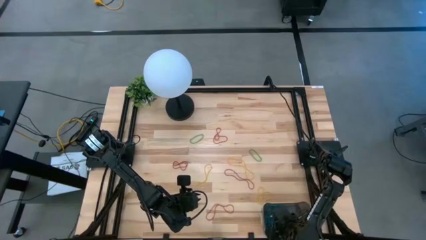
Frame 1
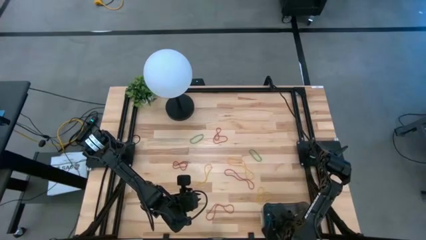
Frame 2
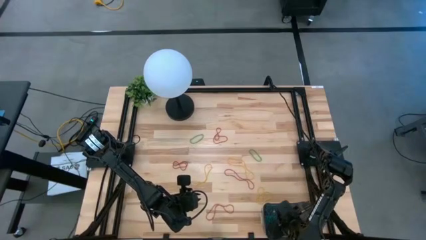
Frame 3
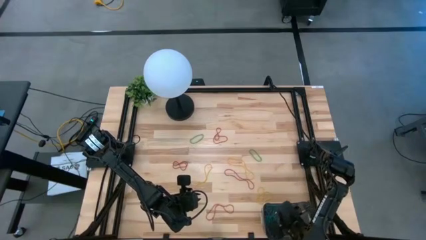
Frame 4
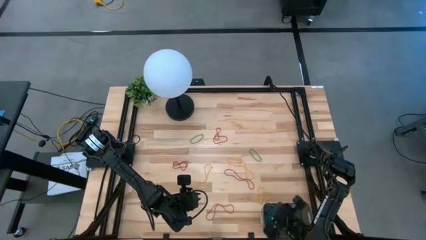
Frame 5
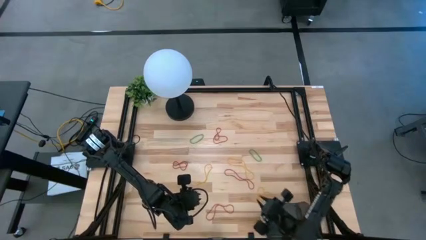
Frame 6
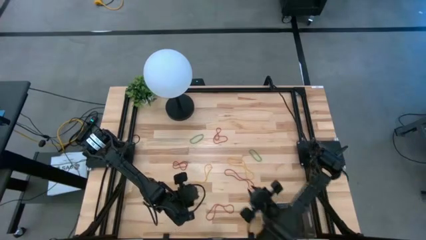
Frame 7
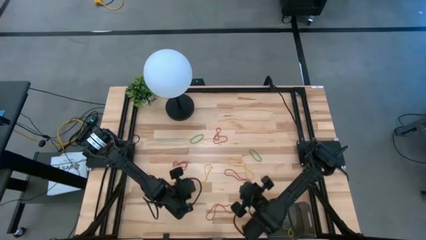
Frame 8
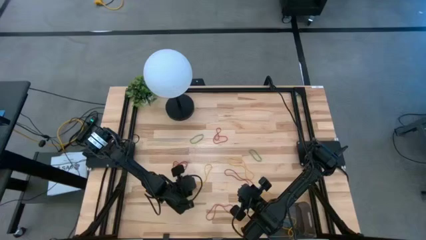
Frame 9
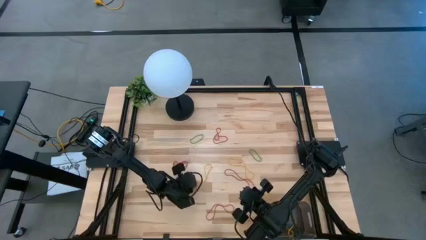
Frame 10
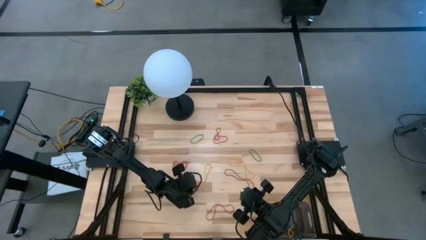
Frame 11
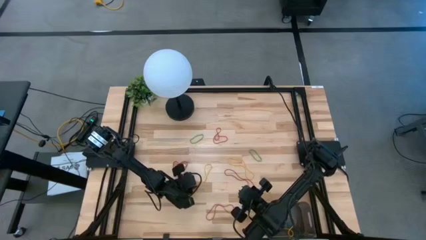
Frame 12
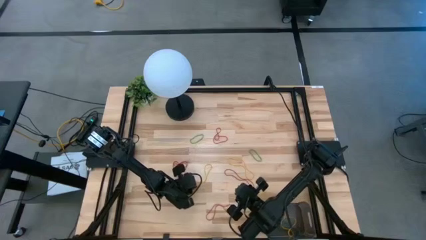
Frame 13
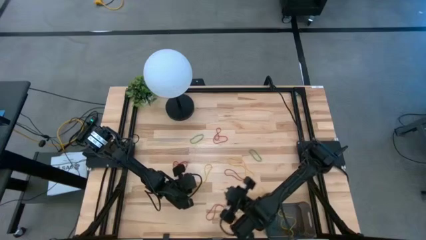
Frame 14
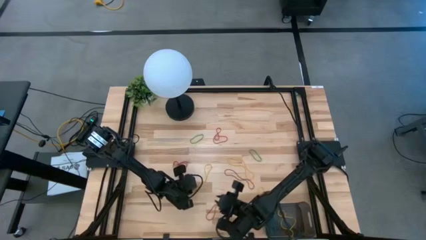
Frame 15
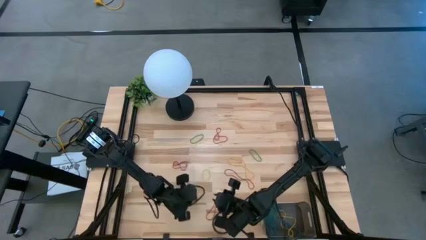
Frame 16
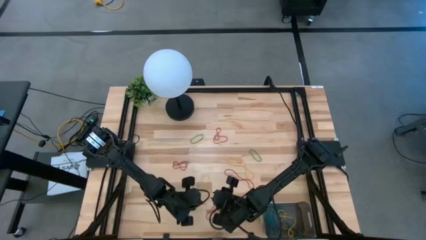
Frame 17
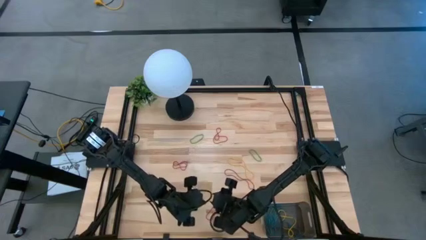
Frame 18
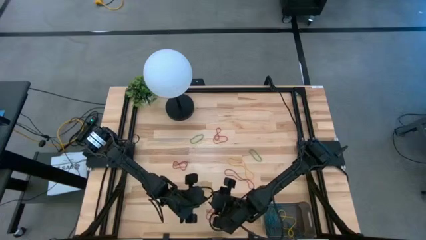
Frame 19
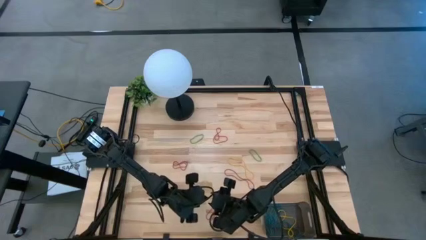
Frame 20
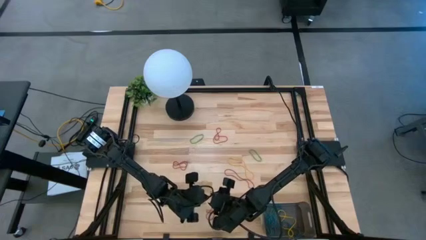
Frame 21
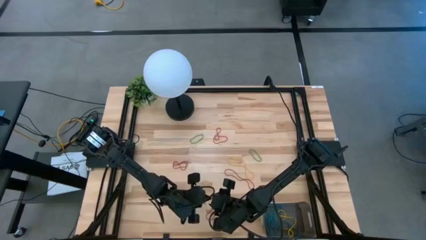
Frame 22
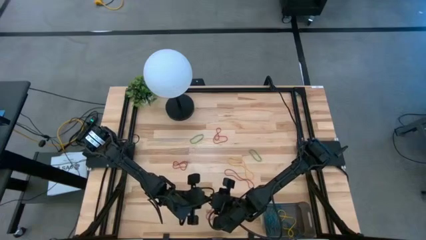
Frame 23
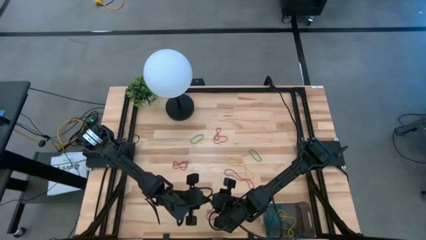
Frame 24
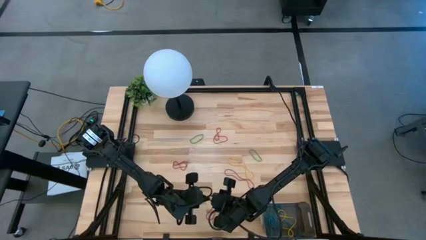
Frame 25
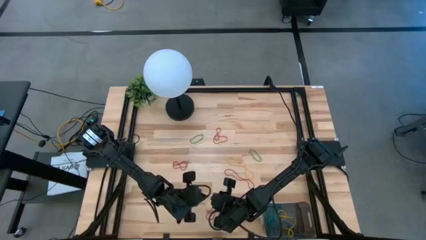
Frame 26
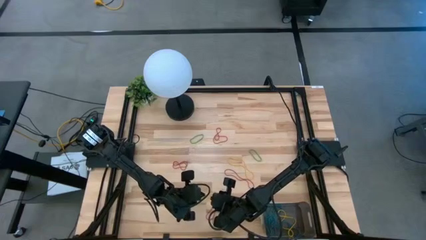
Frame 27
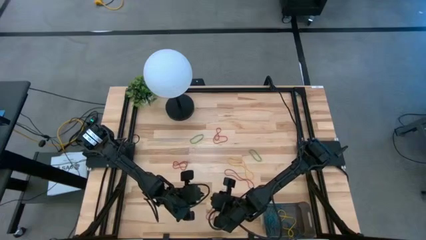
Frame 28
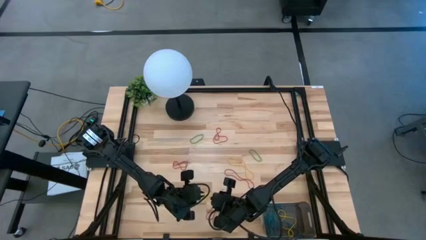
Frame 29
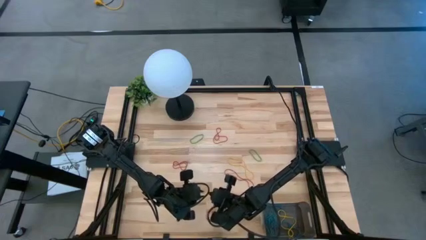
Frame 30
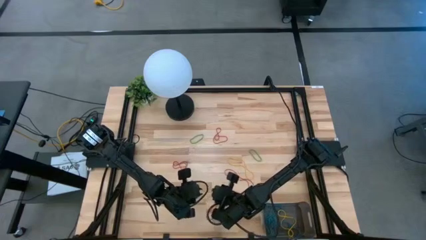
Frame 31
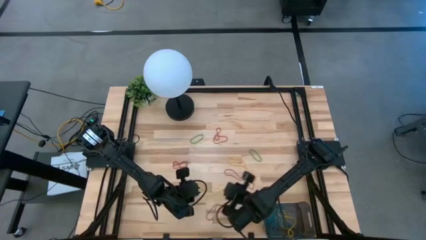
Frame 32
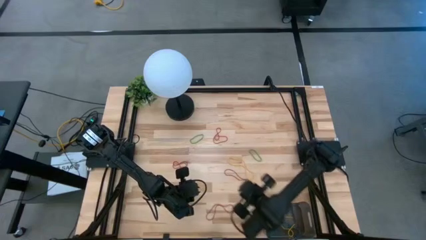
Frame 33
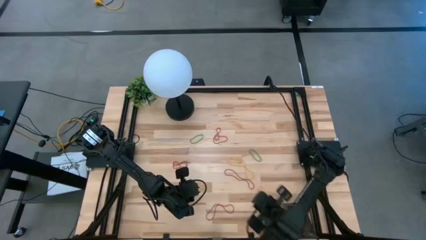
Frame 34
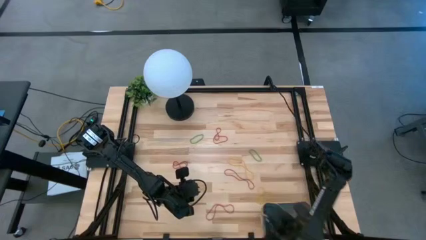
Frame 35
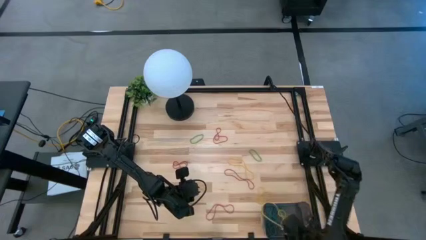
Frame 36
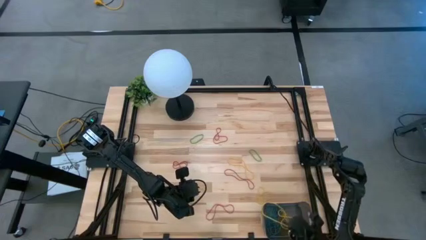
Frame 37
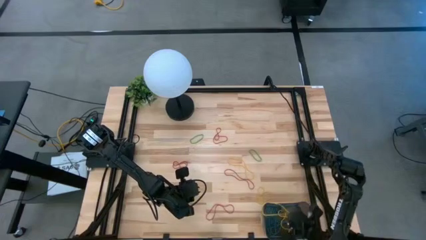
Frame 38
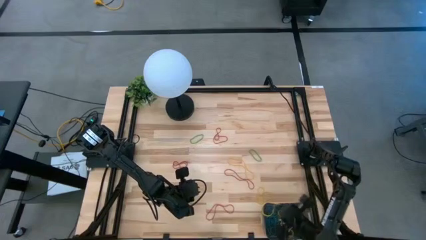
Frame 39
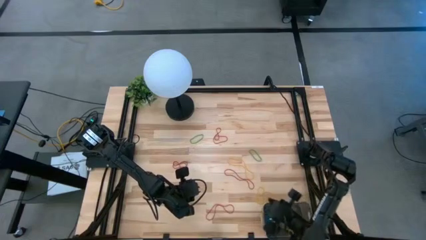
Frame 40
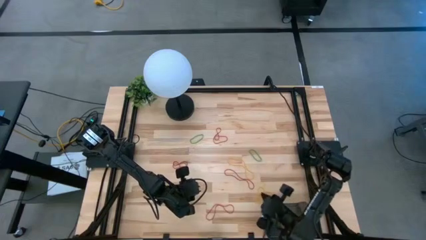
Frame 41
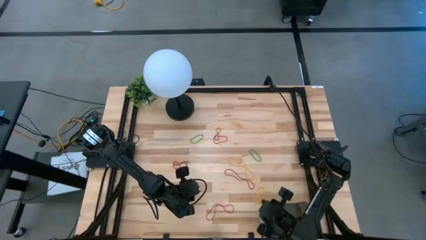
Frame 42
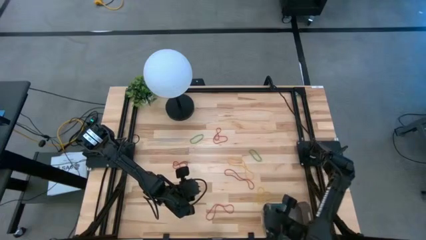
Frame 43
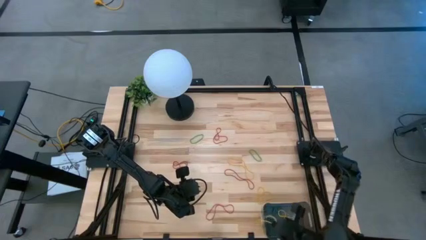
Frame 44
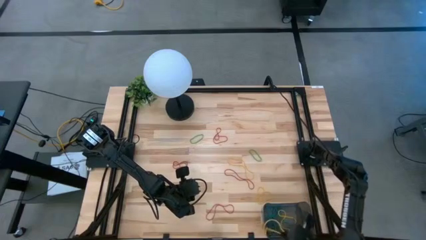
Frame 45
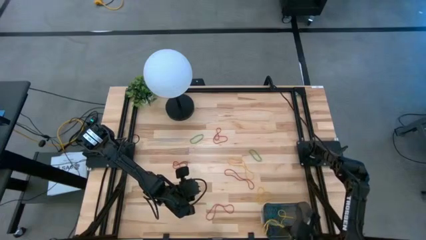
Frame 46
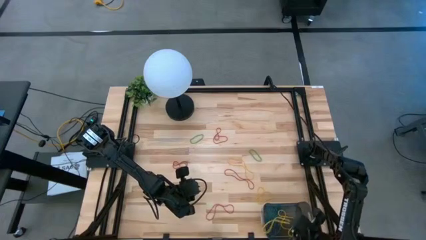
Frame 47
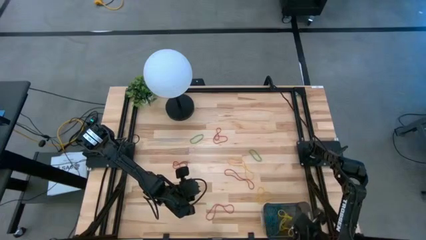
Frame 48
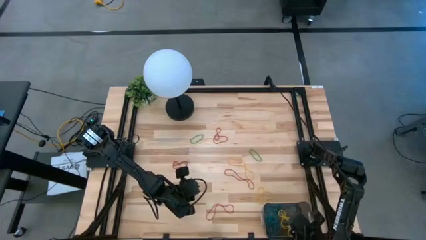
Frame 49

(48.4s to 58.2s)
Task: Pick and place items into bin
Put the yellow rubber band into the black bin

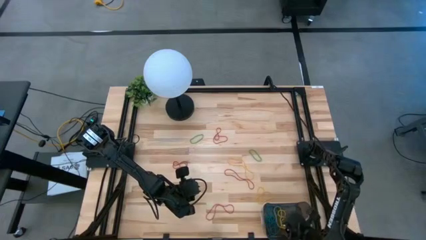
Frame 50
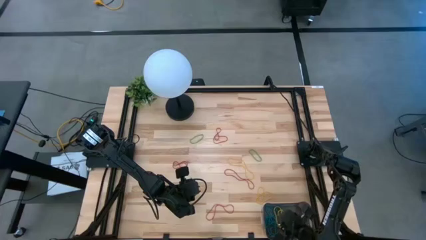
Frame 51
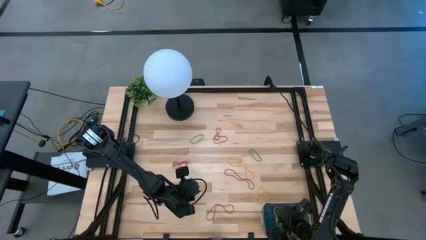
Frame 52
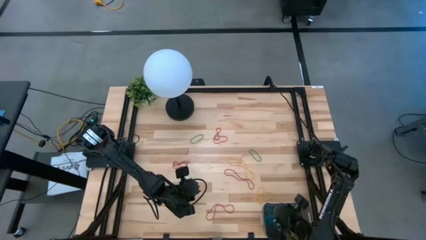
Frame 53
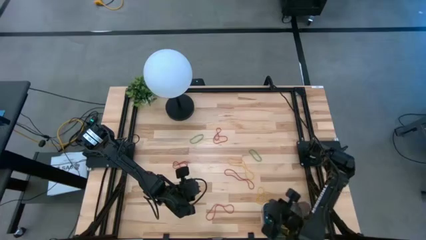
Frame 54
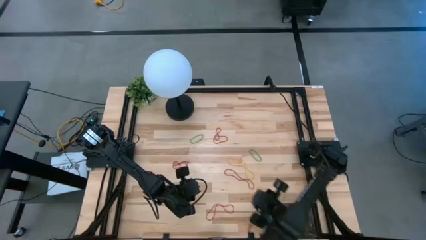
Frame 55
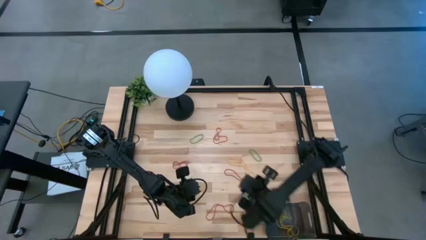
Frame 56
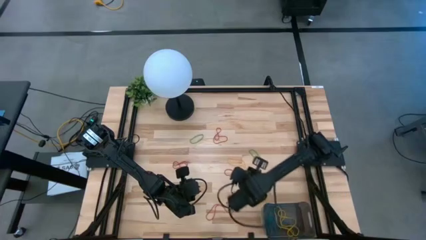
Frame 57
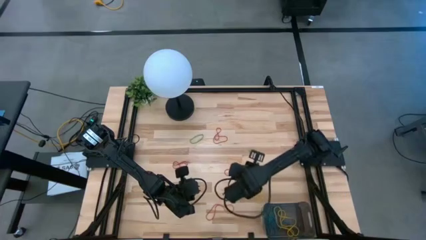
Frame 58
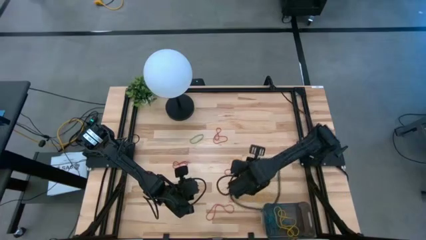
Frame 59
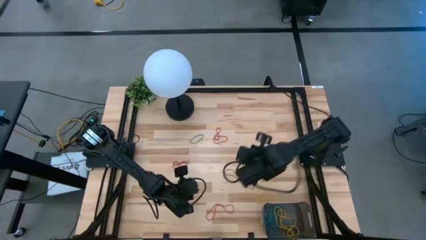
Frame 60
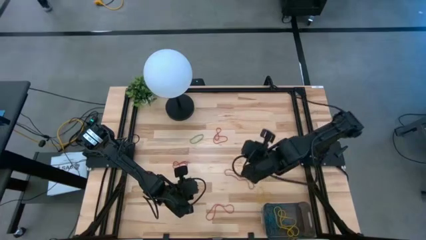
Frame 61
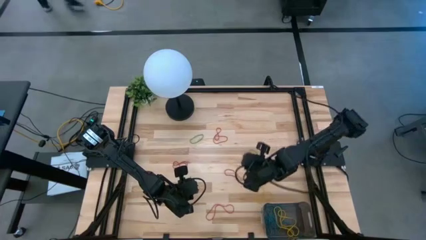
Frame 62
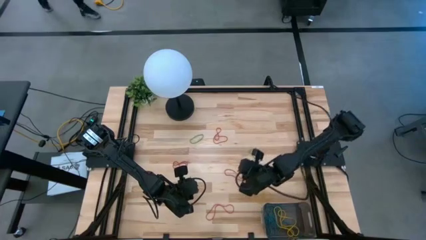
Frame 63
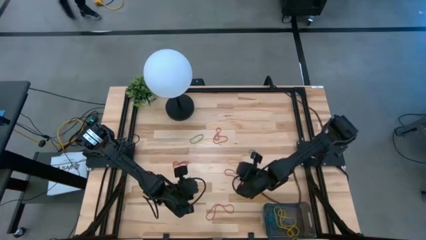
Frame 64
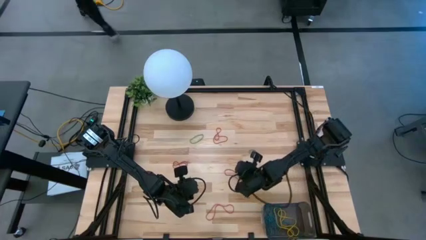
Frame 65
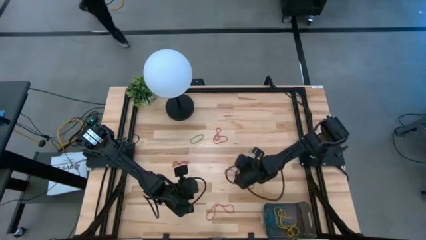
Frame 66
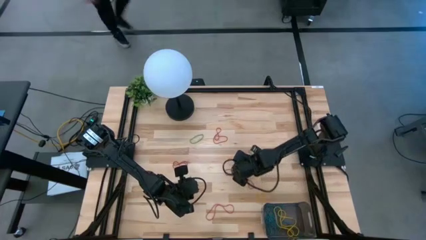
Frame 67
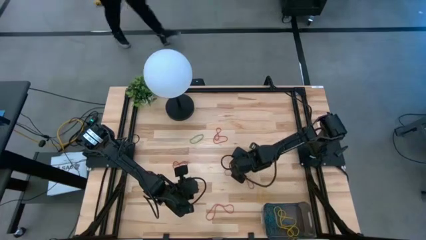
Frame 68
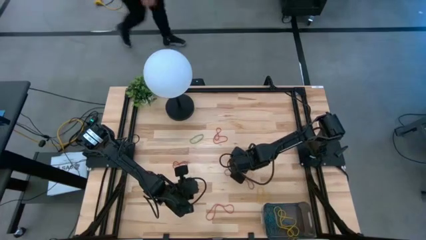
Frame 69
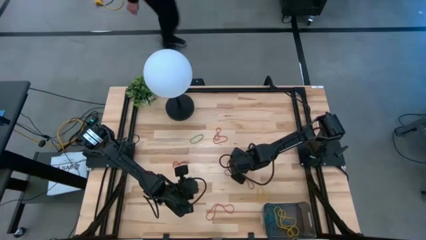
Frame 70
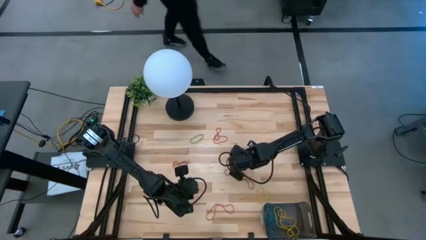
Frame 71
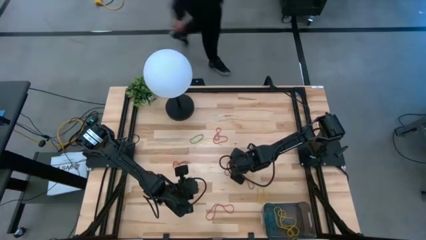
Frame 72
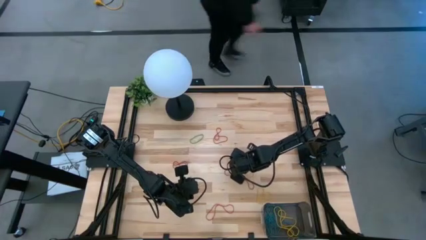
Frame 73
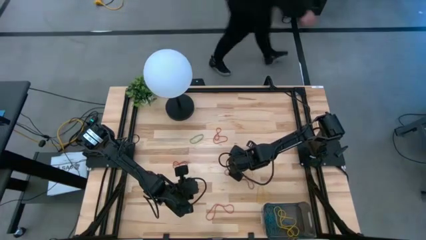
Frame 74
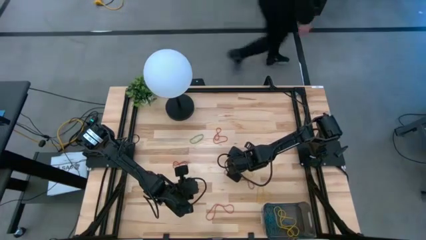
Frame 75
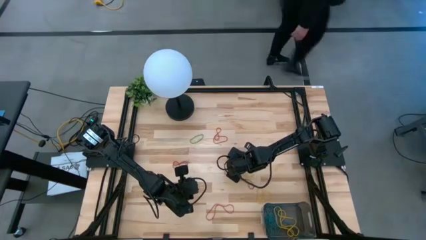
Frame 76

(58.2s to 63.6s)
Put the yellow rubber band into the black bin

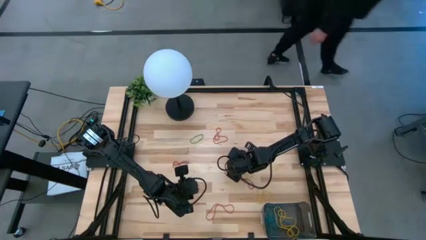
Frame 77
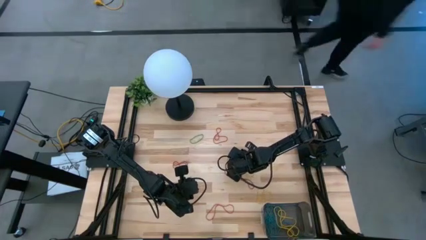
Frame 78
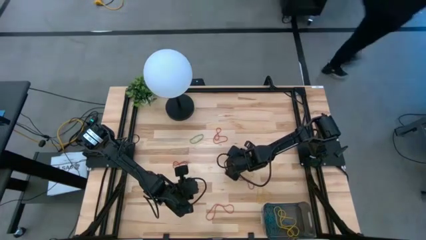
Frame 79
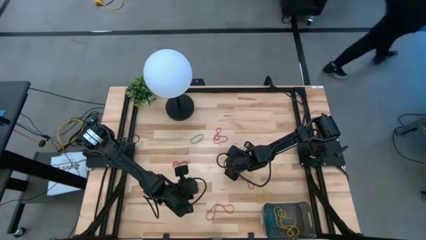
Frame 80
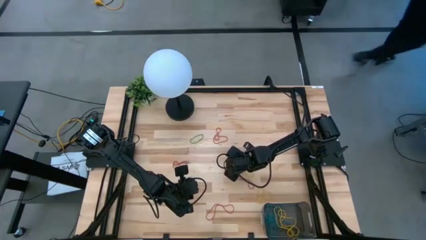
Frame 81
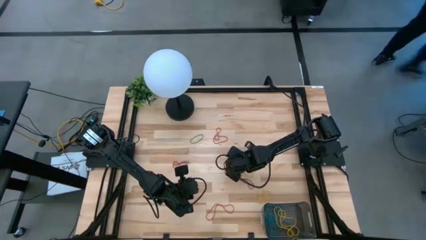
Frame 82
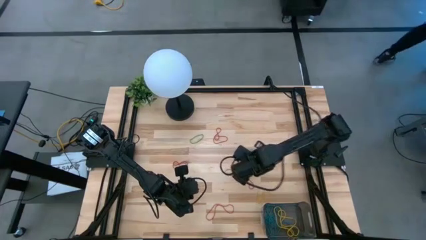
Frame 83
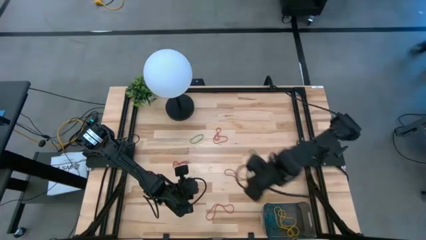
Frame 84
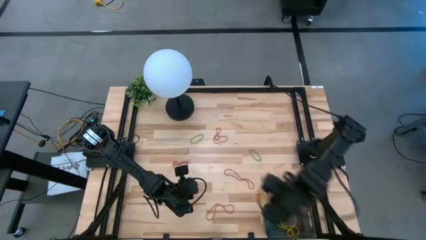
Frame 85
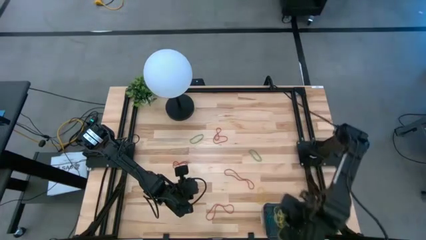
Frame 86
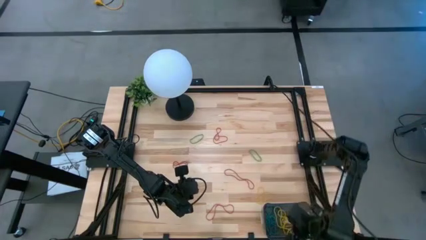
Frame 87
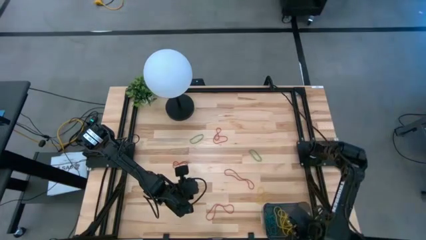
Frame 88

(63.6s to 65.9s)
Put the yellow rubber band into the black bin
